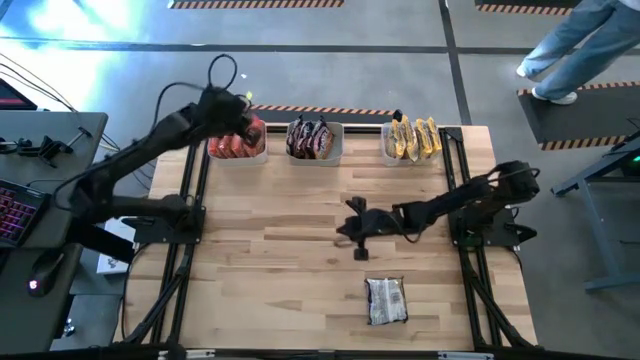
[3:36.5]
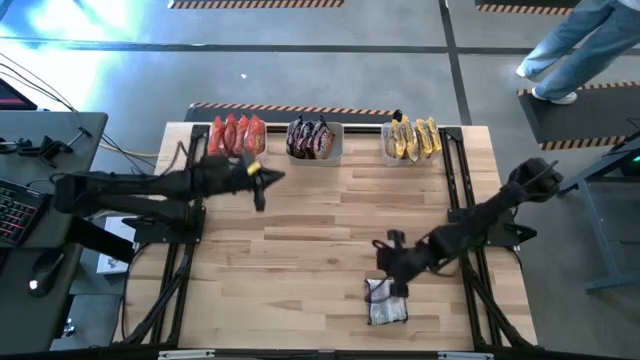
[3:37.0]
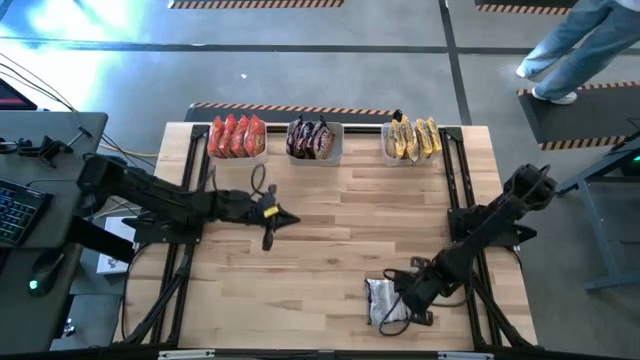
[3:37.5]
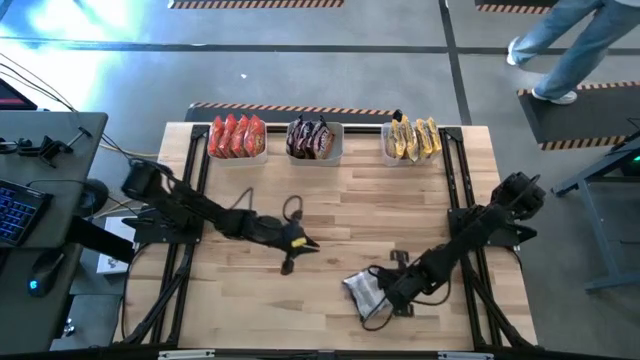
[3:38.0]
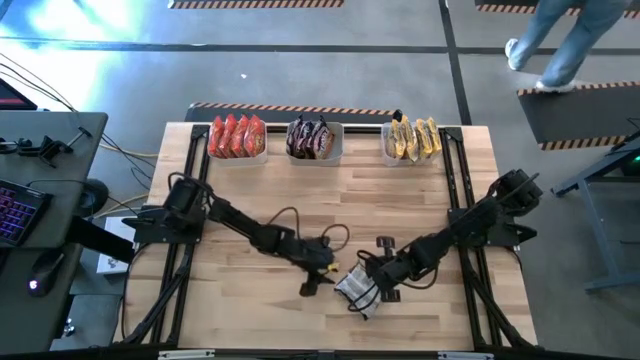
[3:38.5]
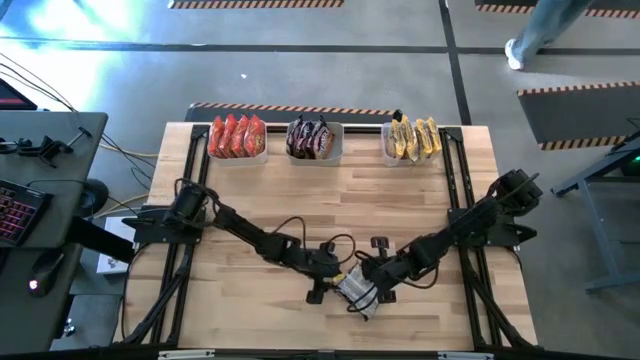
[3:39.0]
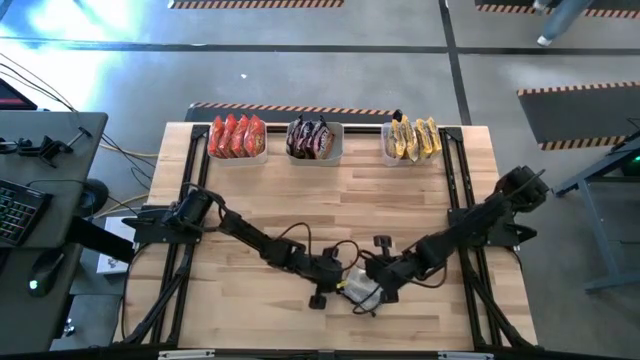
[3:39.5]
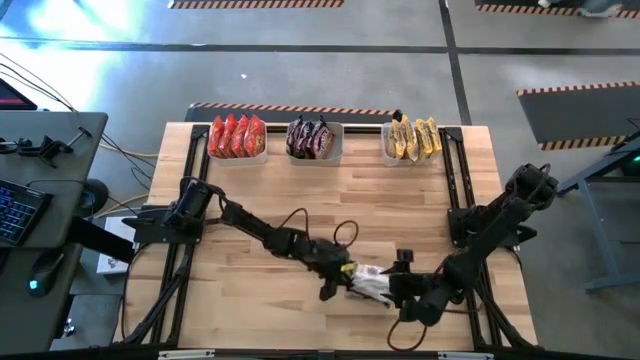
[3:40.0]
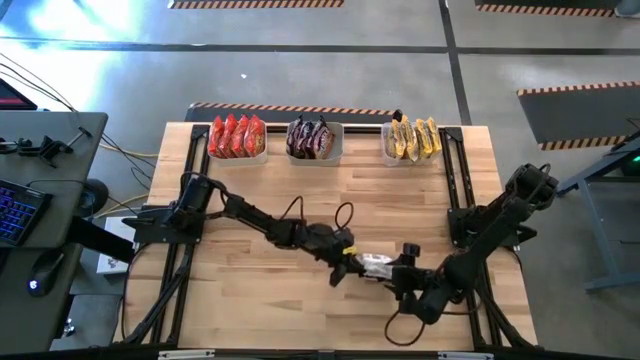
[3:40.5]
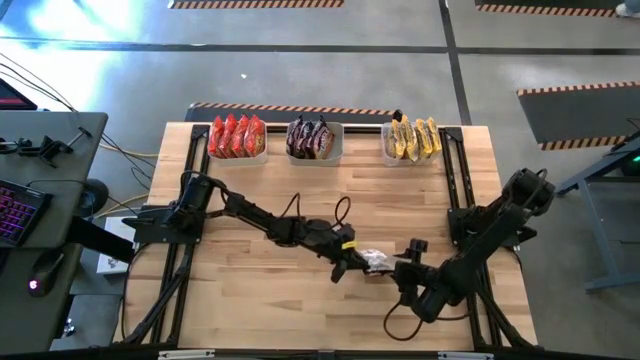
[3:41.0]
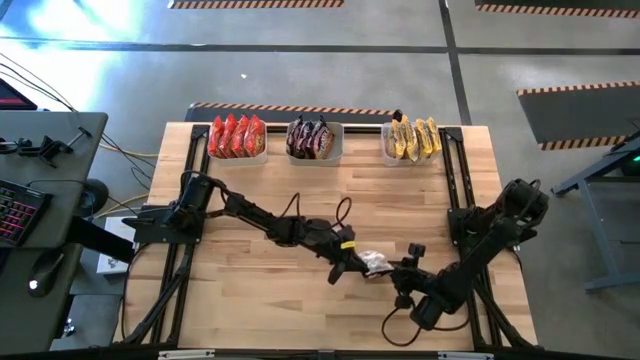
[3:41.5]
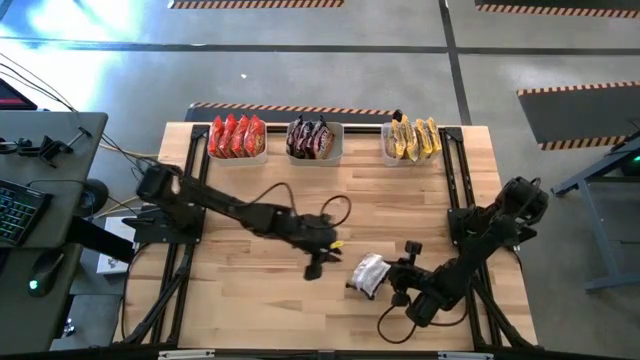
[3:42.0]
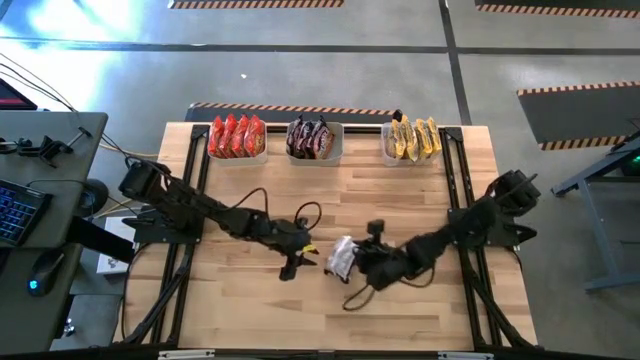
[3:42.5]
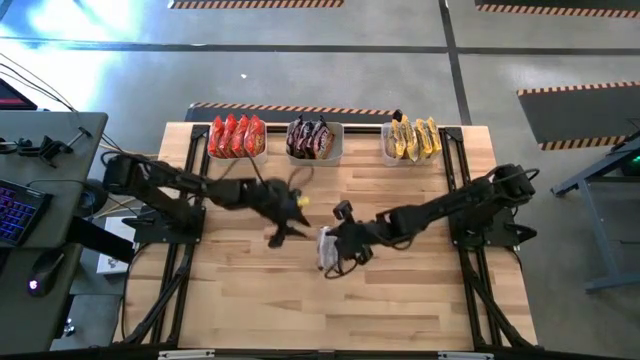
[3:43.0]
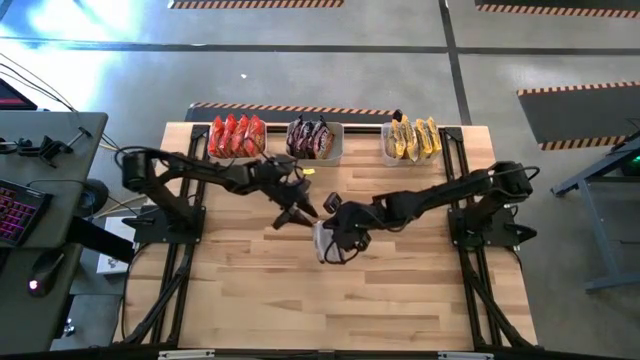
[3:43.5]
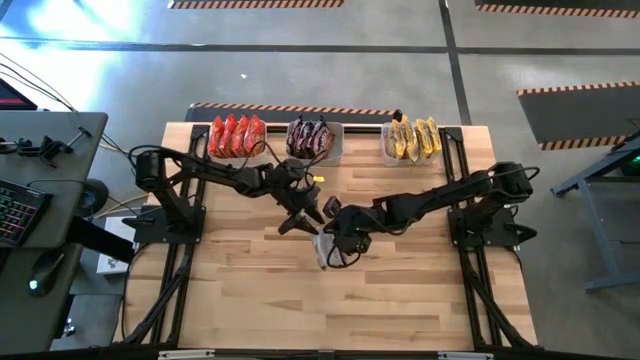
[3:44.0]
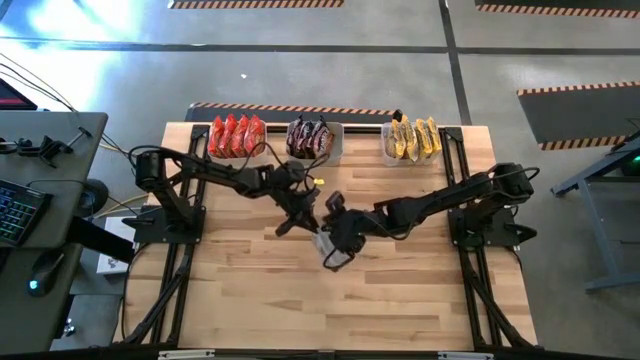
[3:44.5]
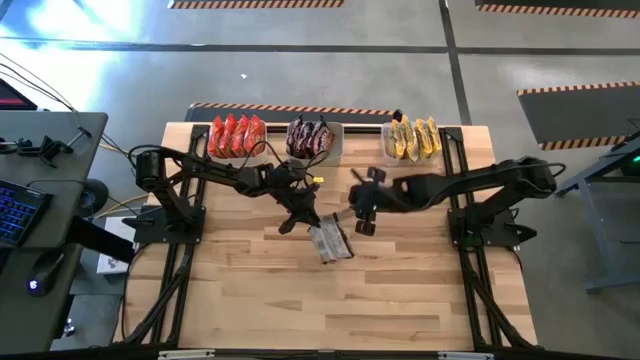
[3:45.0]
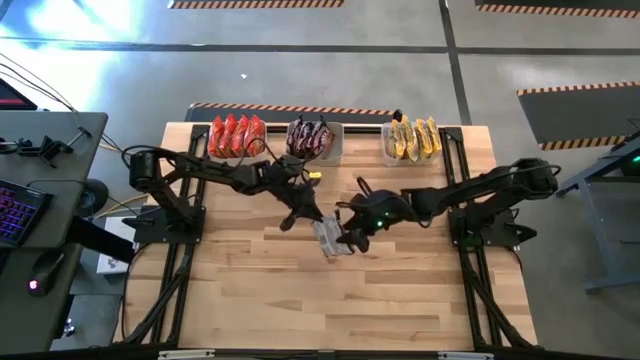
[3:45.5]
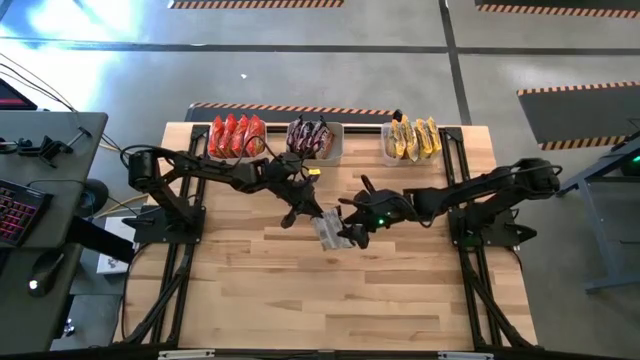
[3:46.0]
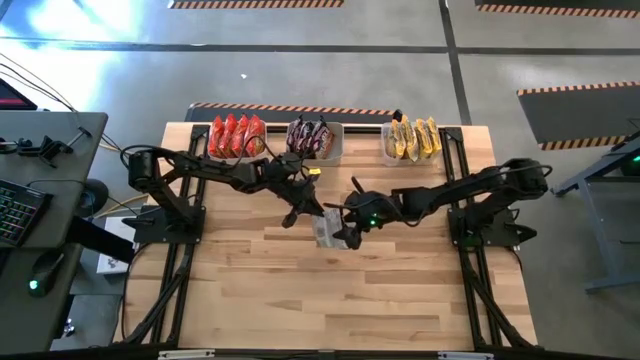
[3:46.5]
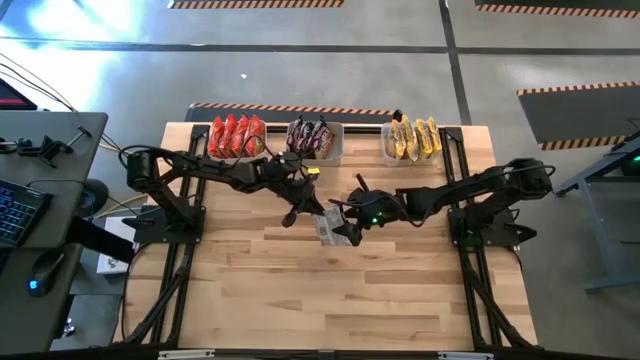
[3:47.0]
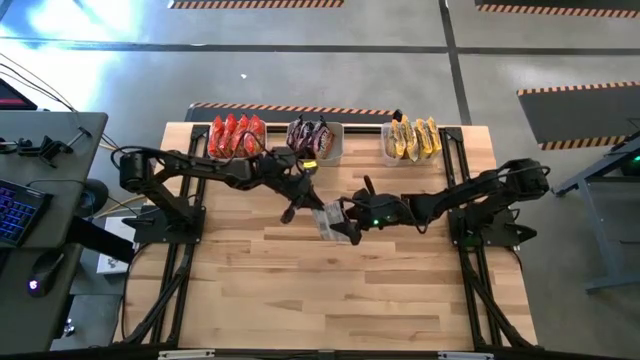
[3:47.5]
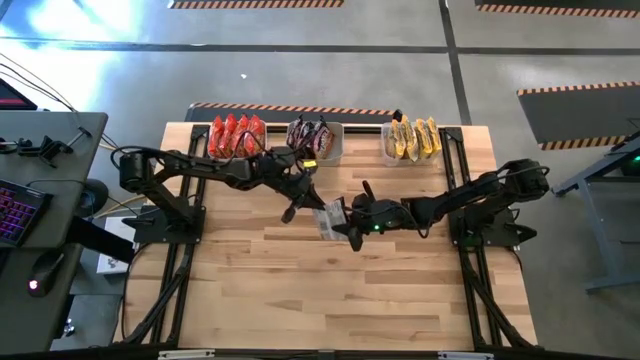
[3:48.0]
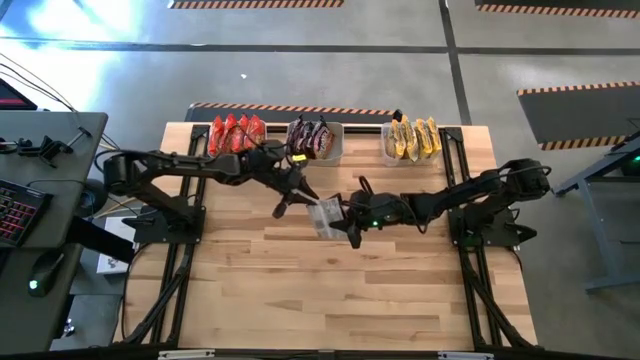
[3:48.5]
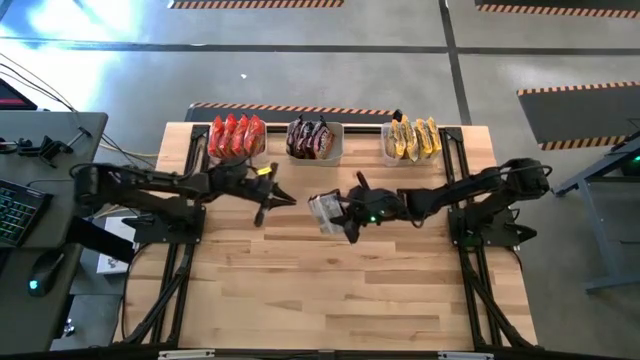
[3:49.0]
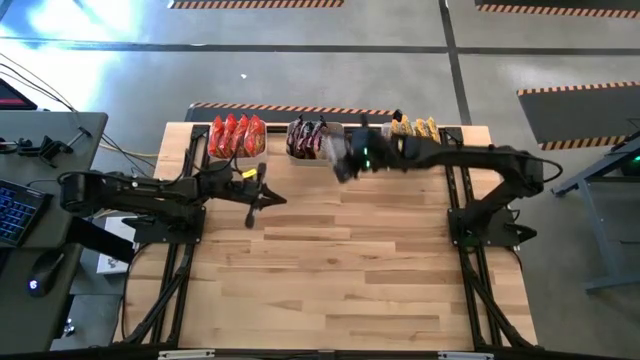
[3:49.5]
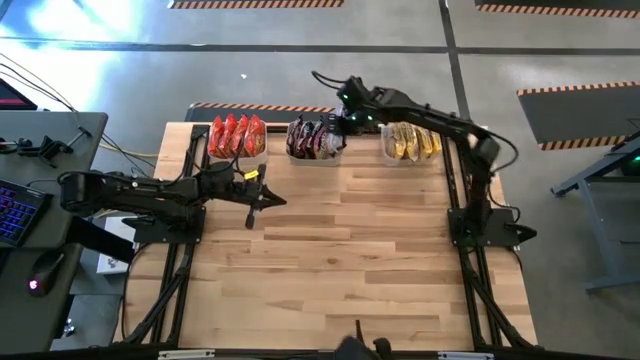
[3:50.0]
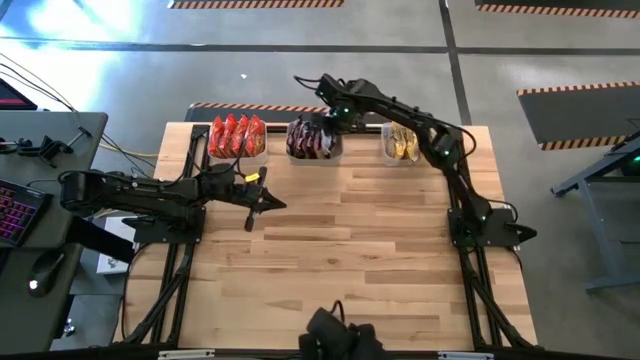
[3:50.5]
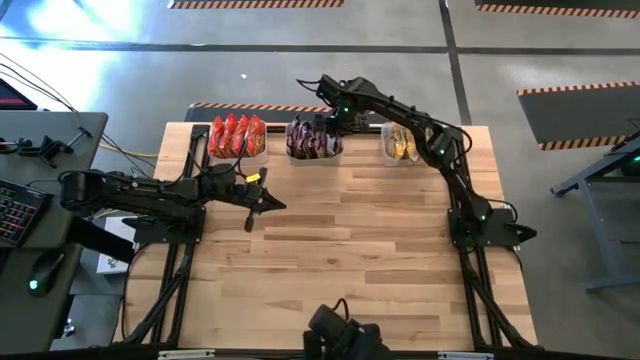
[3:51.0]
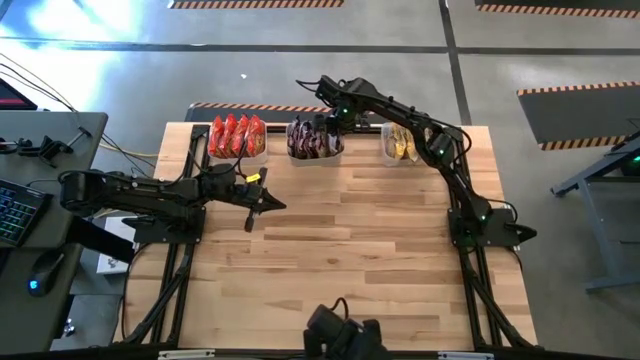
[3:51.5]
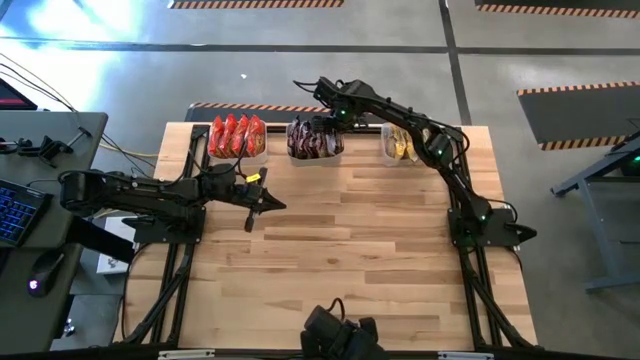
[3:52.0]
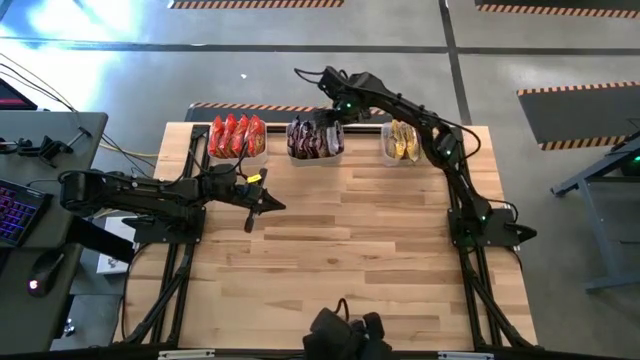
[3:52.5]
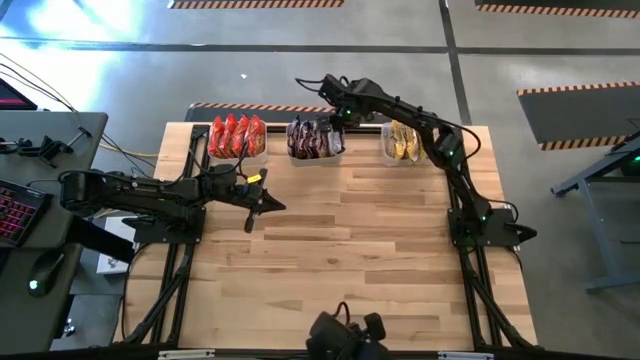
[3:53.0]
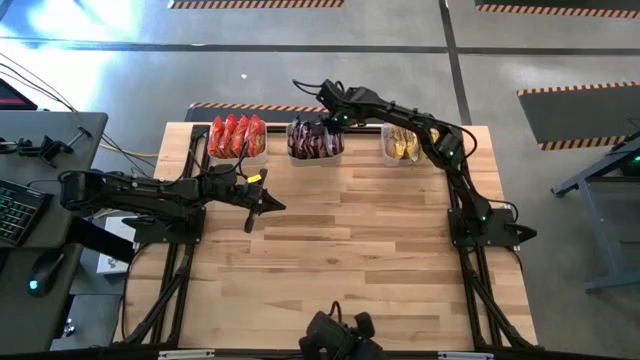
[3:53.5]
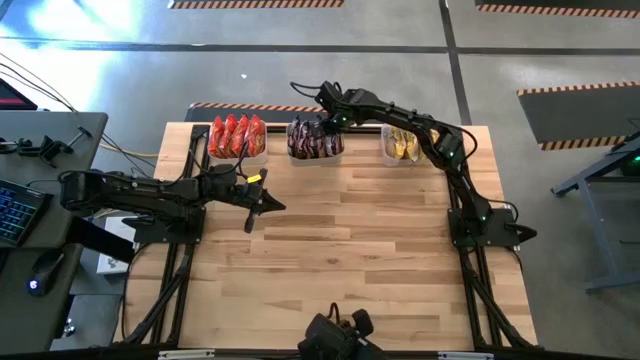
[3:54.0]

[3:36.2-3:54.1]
Task: Sort Maruchan noodles
Put the black noodle pack into the gray bin

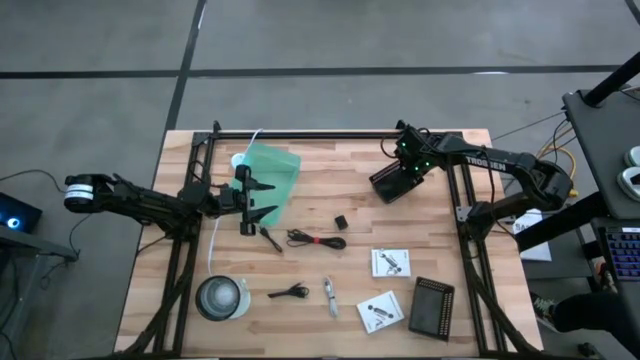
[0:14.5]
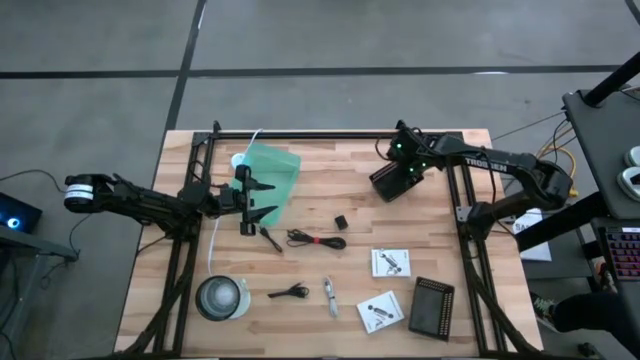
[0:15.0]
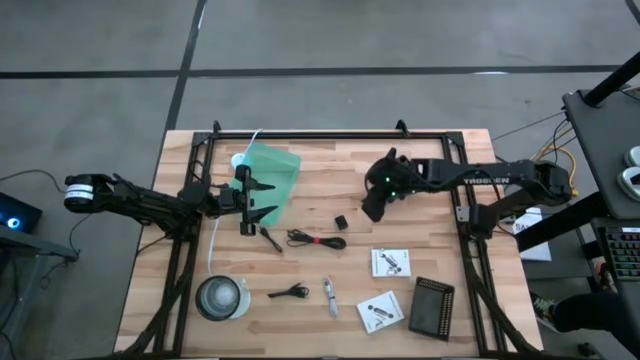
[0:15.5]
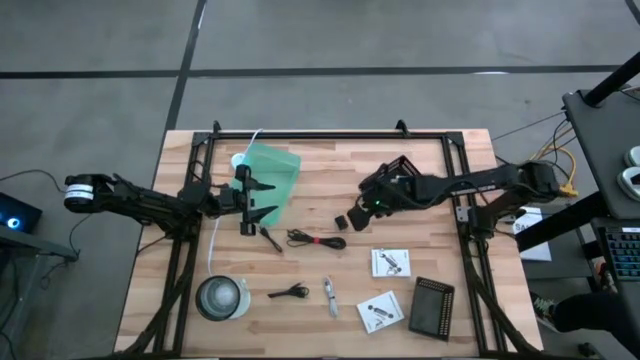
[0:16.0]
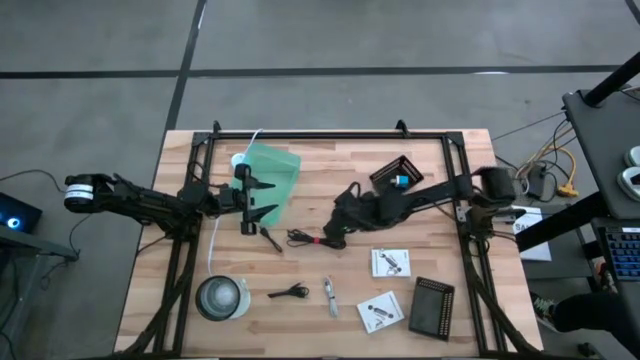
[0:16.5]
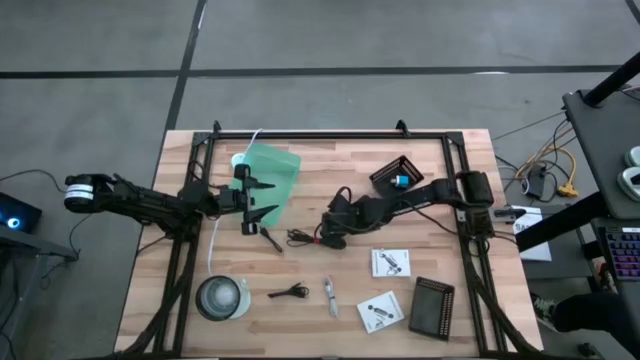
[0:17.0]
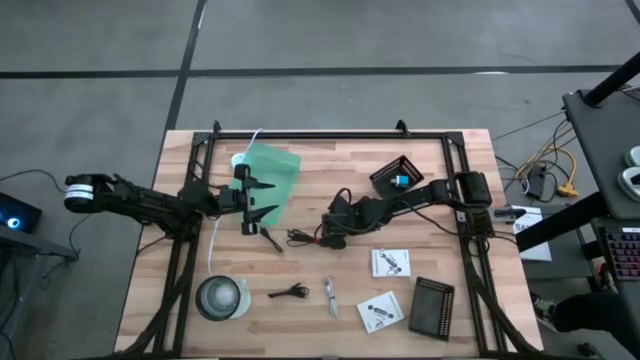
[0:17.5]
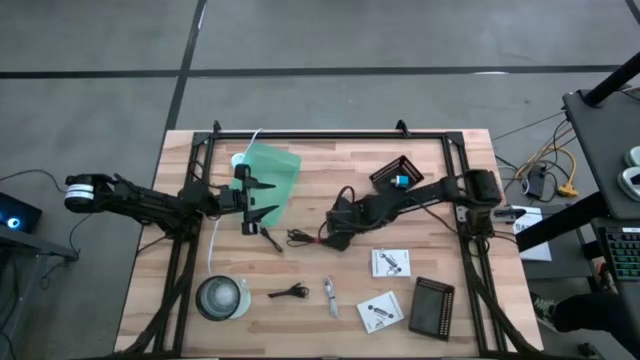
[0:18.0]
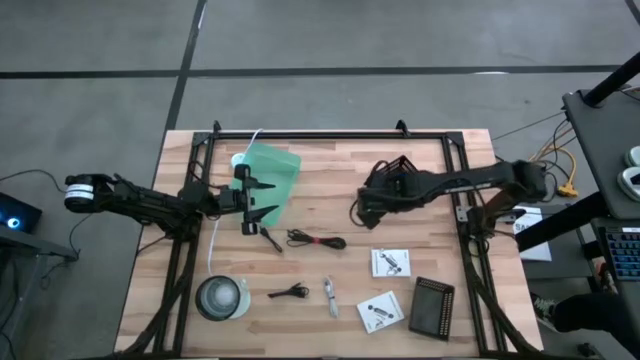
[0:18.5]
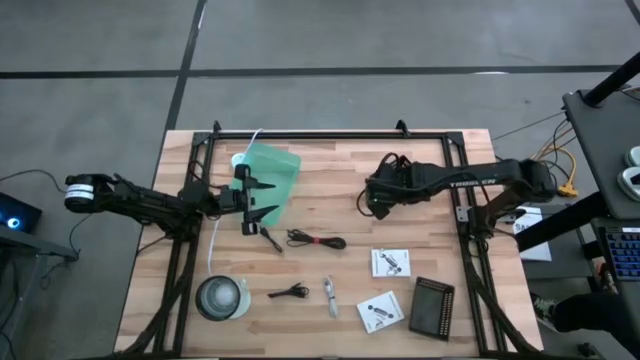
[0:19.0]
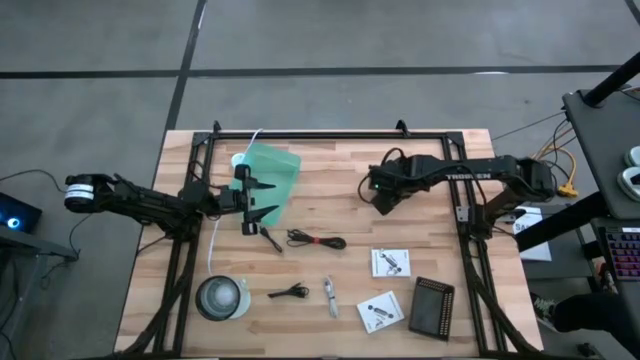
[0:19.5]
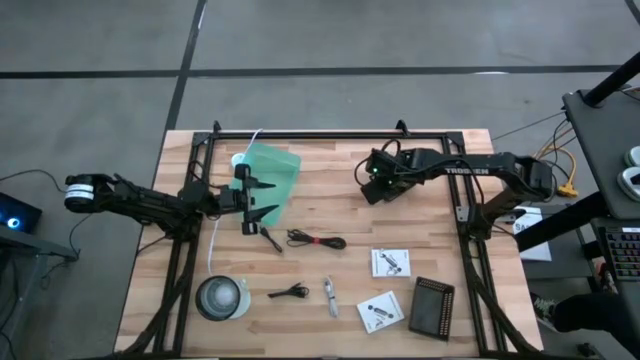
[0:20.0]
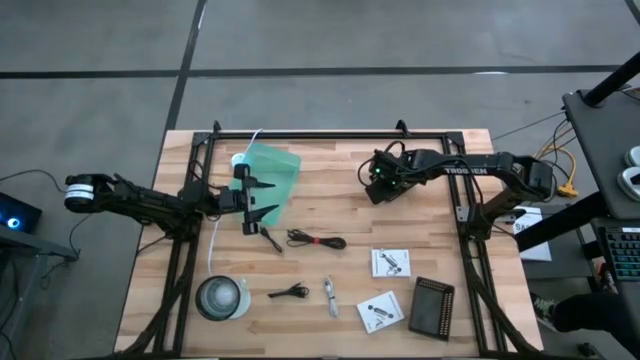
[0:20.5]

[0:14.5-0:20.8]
Task: Pick and place items into bin
Put the black charger adapter into the top black bin
